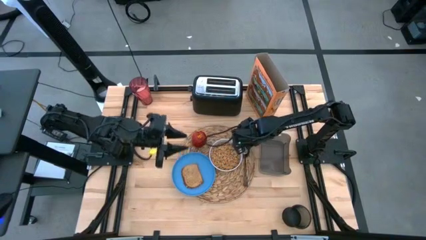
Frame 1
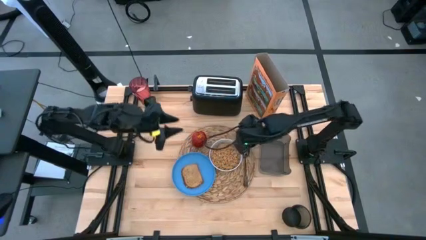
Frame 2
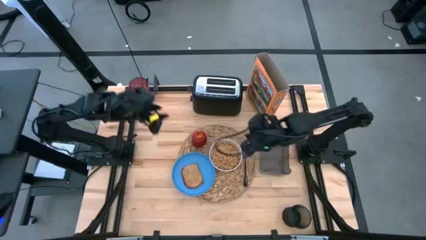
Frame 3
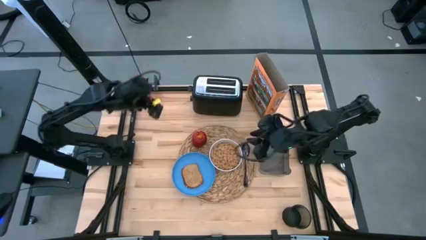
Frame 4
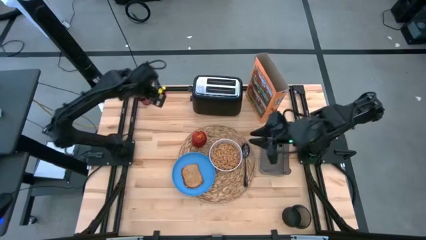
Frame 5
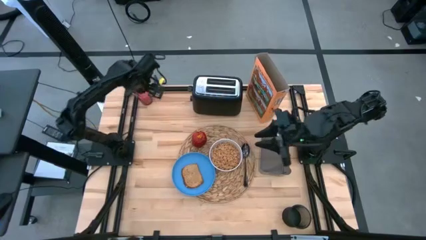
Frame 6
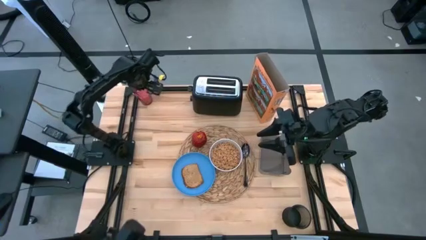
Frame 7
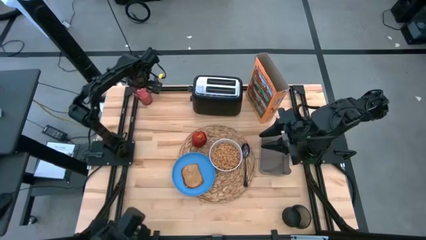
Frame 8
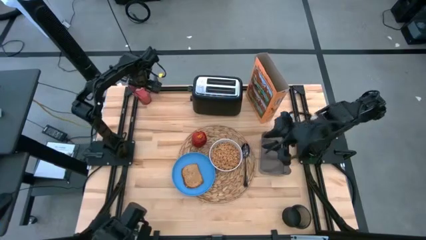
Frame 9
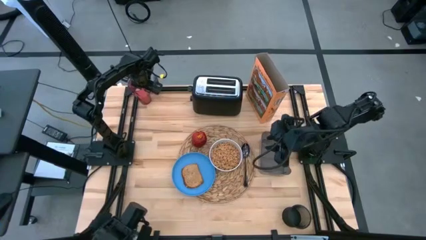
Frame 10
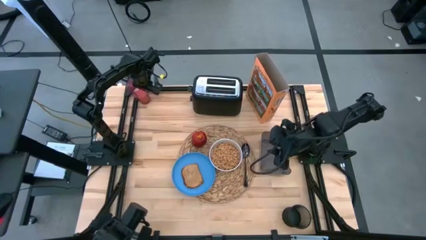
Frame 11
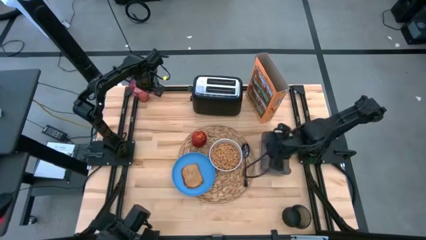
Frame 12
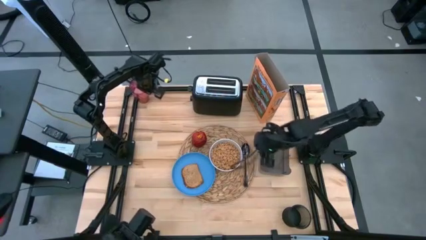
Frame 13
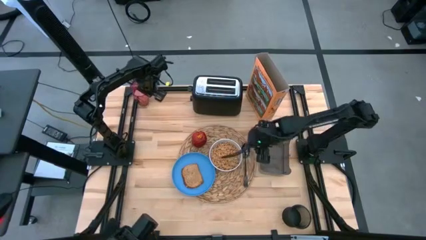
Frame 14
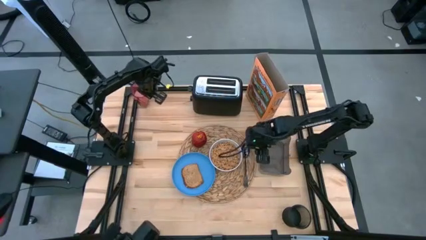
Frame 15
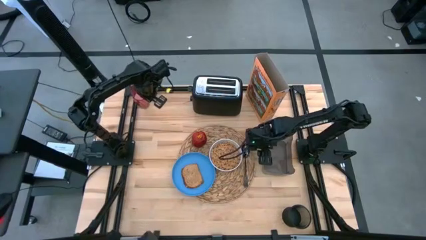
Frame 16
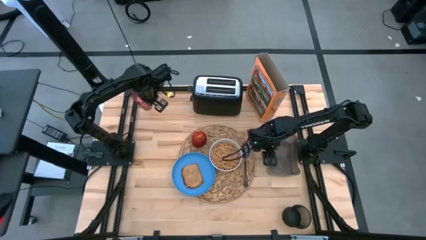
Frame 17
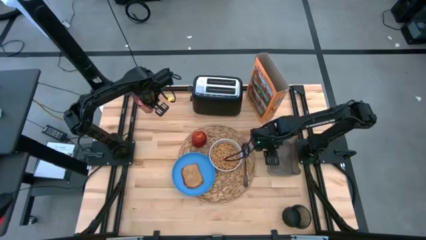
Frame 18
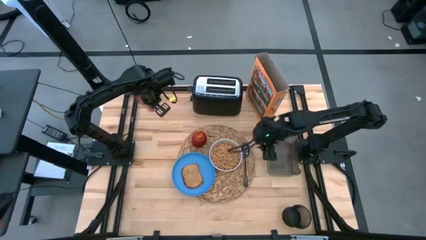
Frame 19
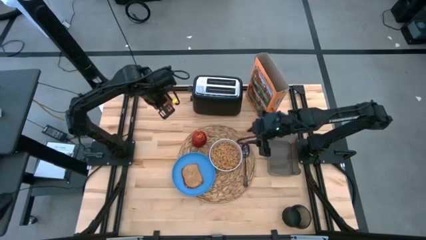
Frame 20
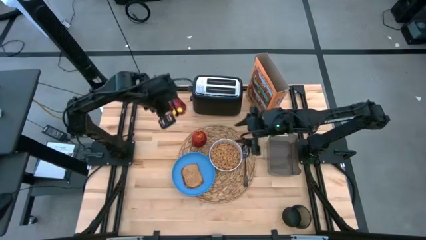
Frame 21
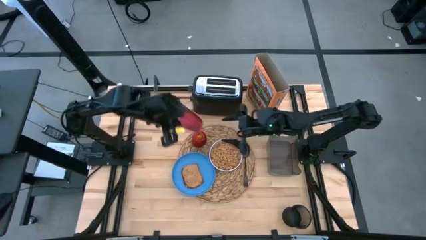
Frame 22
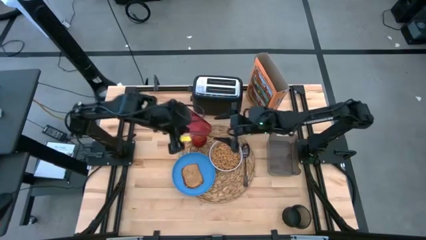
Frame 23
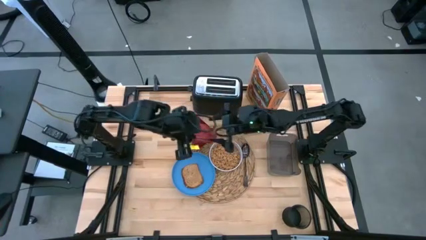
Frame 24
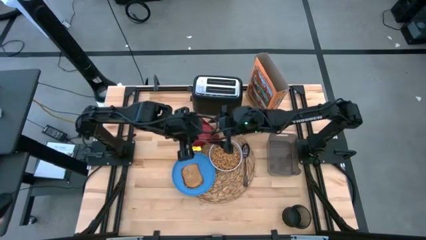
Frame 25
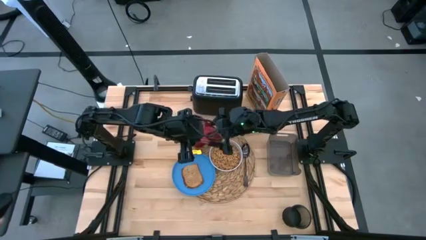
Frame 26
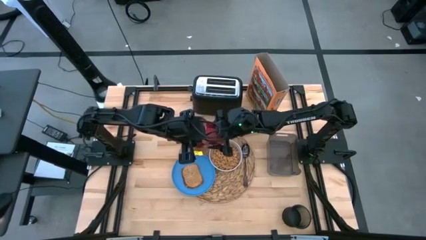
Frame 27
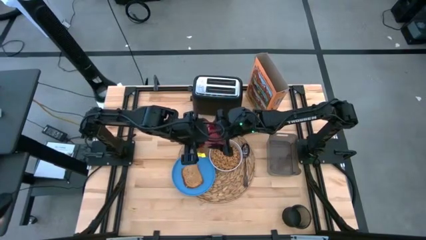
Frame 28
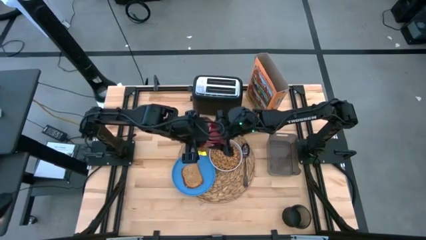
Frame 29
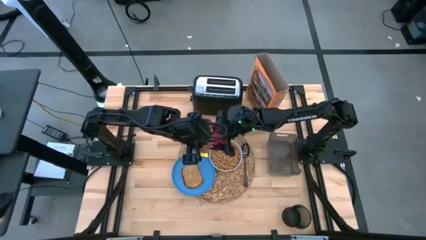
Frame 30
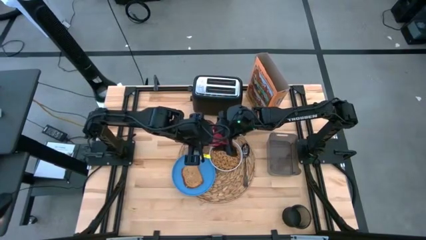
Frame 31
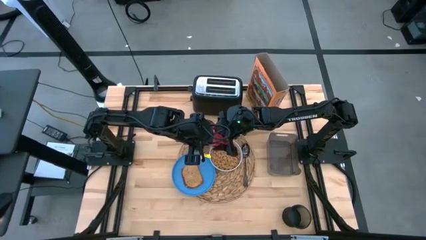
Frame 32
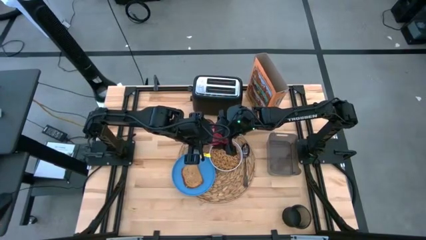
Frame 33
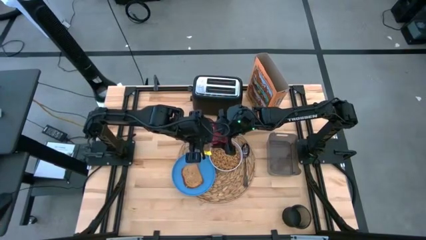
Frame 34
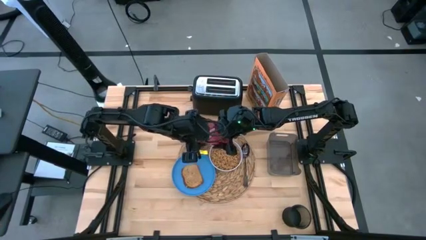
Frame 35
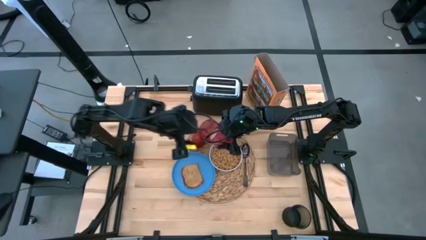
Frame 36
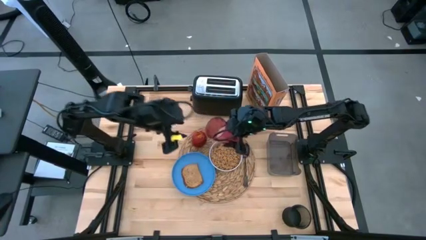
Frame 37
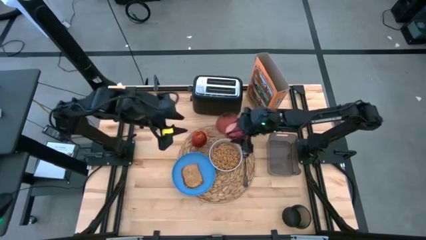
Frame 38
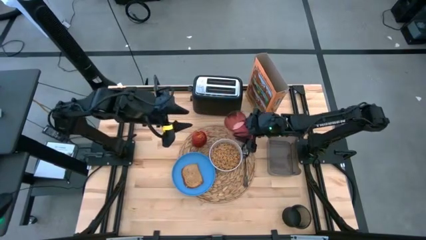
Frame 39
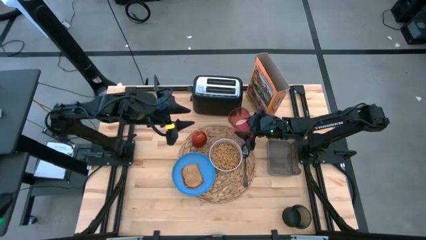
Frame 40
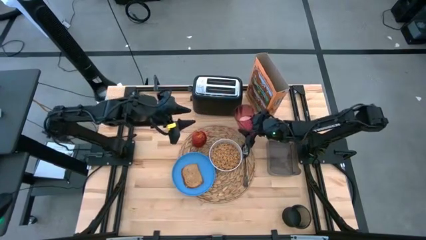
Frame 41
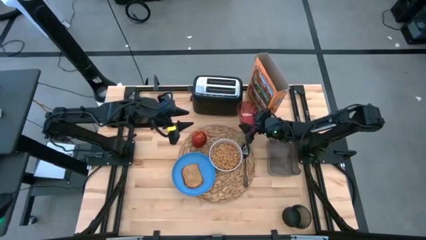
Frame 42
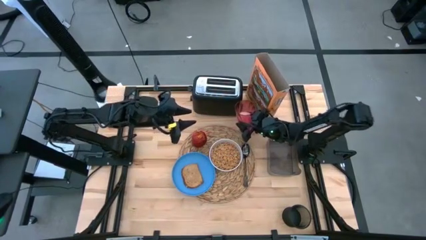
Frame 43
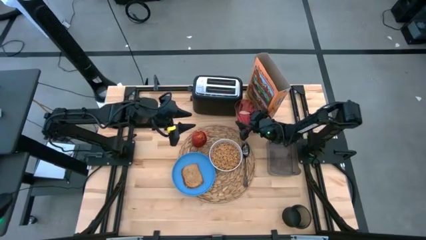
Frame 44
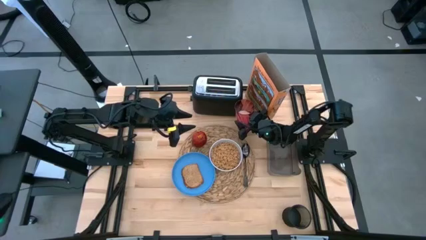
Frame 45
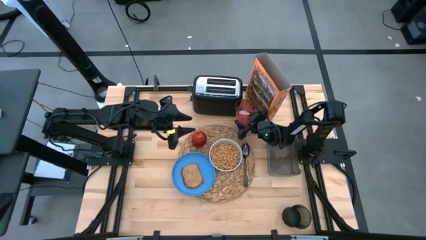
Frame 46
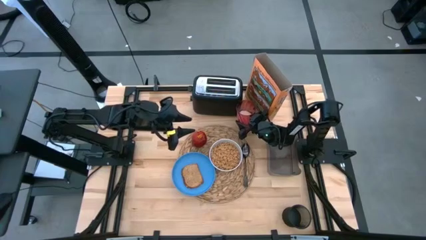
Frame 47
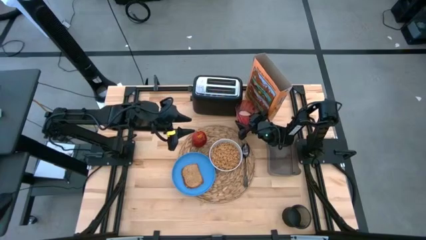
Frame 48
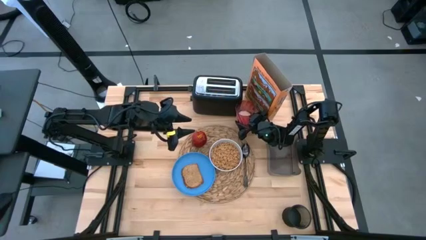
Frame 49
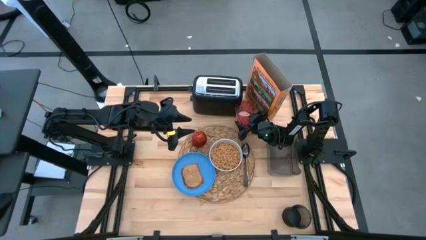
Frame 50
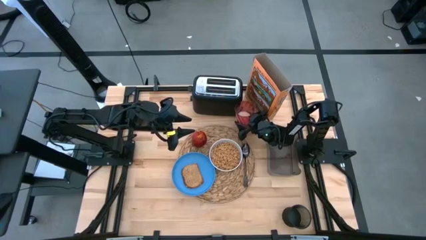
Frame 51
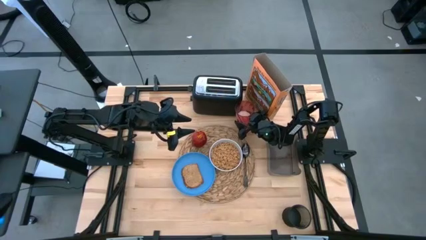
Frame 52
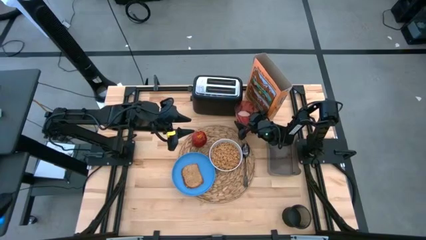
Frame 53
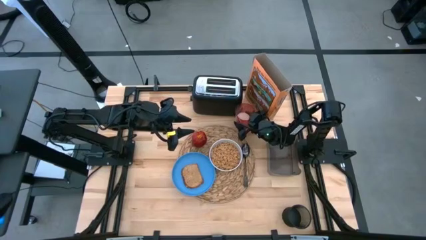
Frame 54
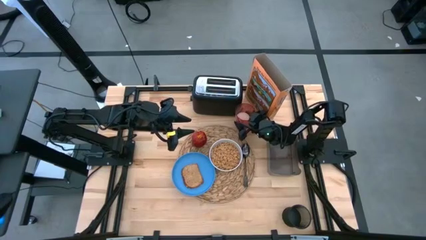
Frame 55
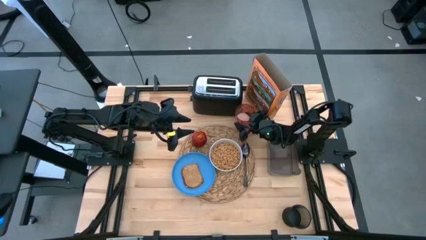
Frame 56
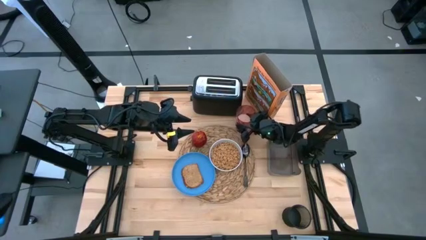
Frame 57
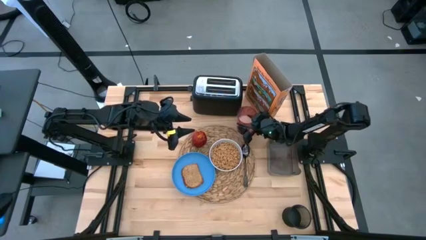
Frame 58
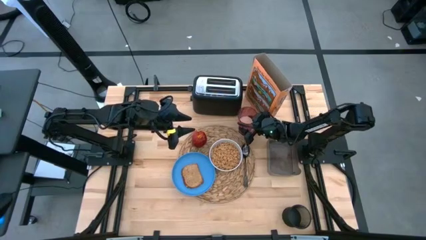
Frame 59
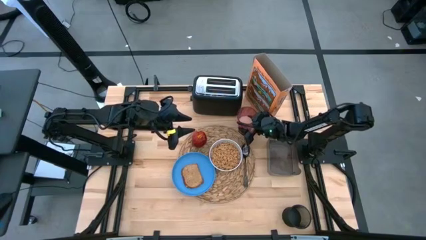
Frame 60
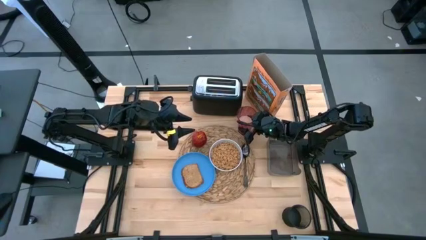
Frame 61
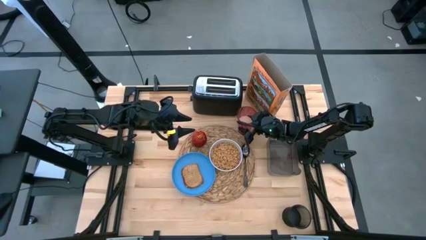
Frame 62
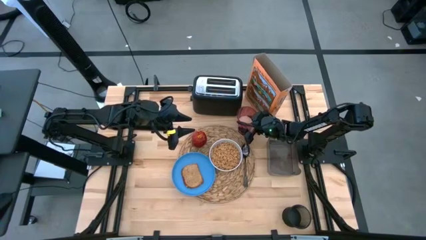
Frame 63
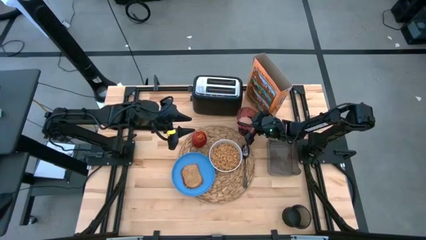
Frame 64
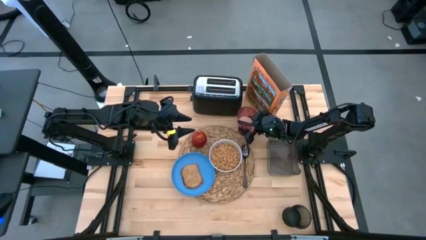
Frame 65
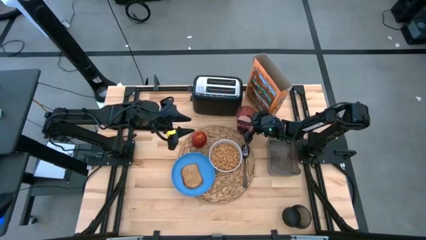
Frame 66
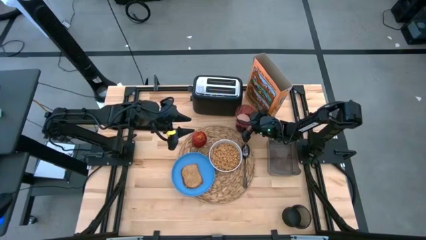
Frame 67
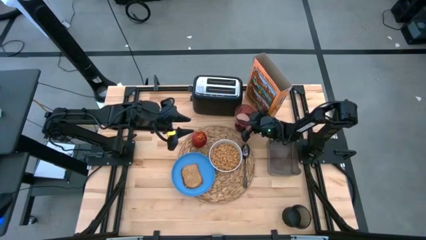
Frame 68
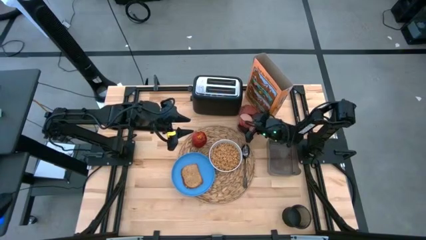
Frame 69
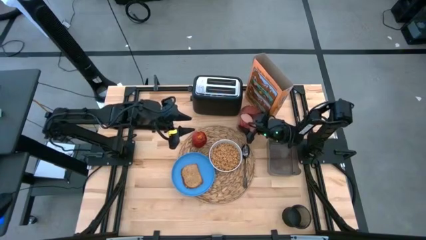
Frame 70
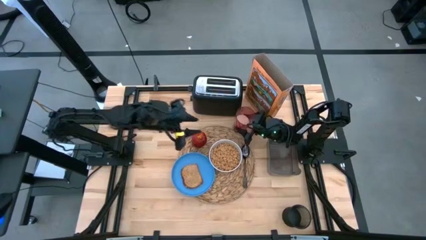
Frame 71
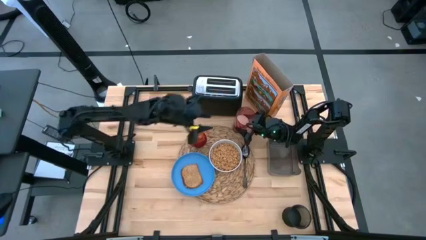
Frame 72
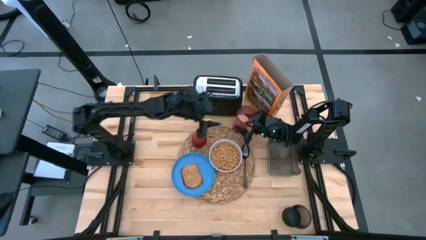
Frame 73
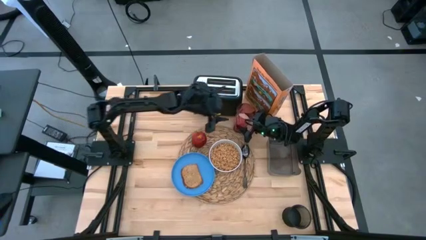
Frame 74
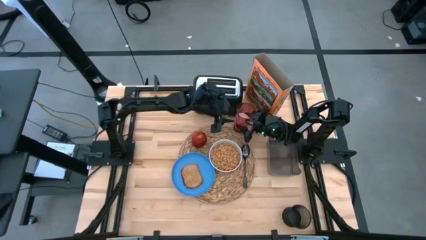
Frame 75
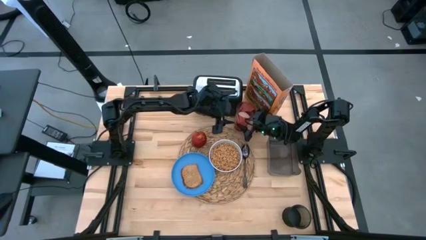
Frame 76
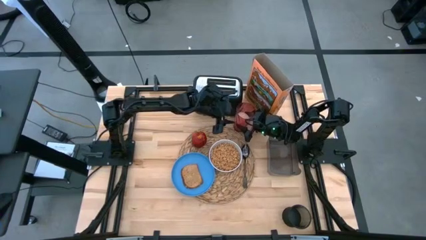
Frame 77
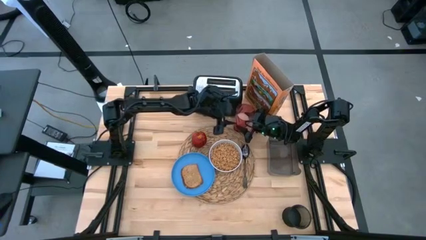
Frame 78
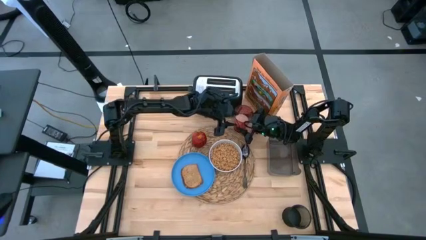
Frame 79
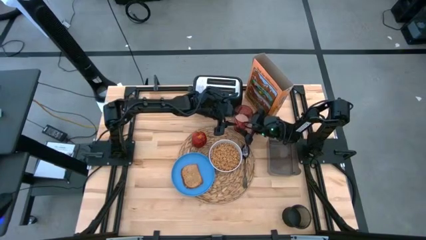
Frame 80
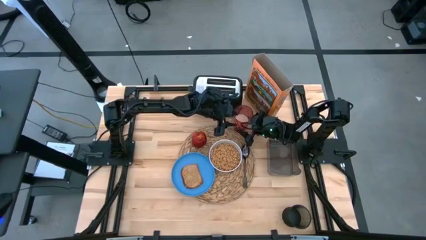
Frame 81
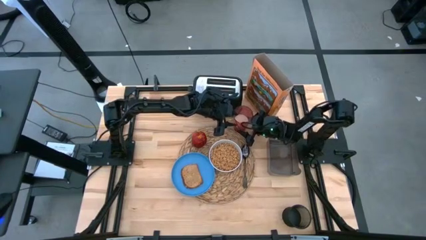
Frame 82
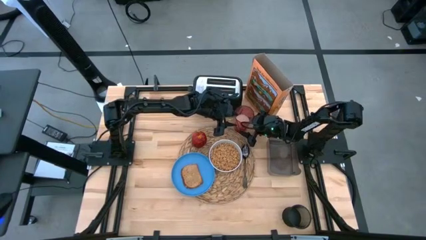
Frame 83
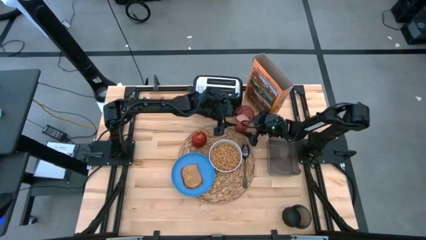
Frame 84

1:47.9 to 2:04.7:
Task: Arrange a breakfast setting
Move the glass on the top right of the table mat
